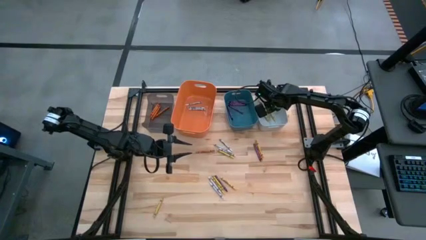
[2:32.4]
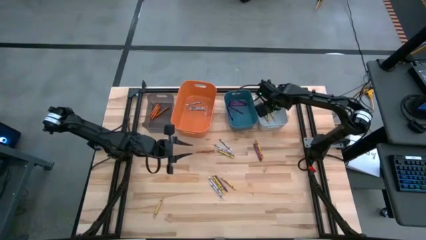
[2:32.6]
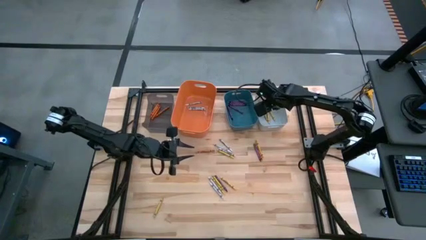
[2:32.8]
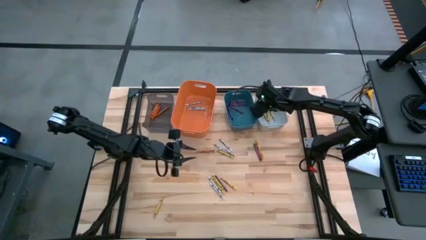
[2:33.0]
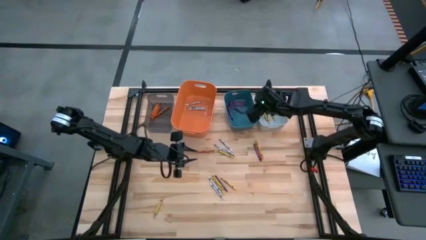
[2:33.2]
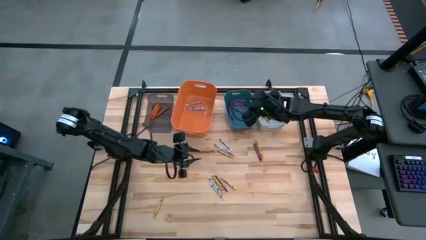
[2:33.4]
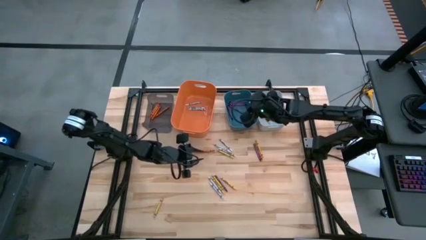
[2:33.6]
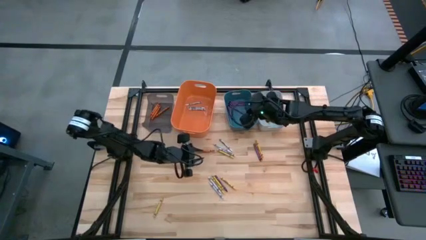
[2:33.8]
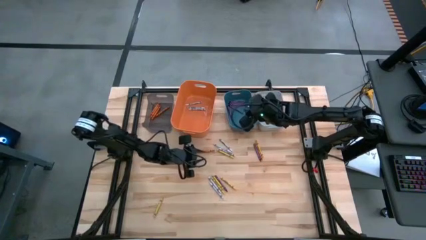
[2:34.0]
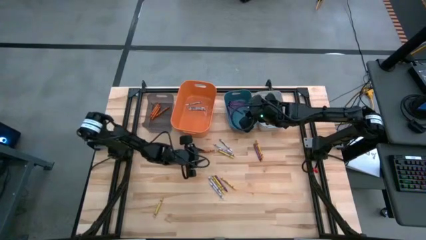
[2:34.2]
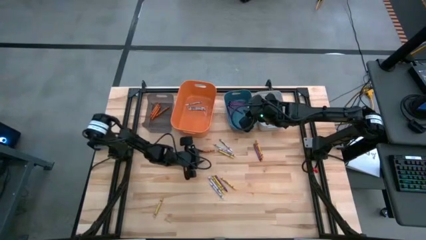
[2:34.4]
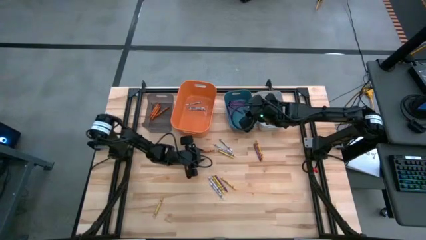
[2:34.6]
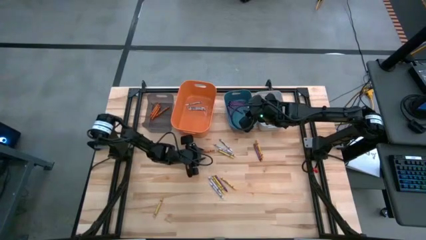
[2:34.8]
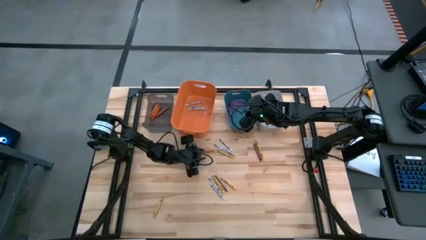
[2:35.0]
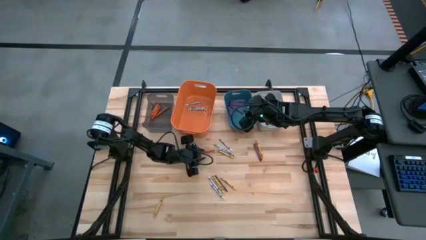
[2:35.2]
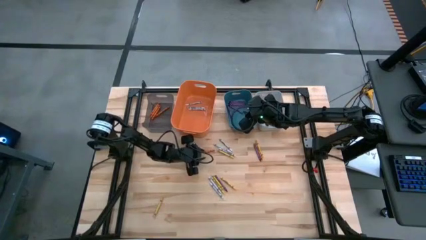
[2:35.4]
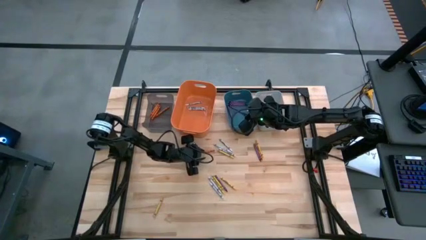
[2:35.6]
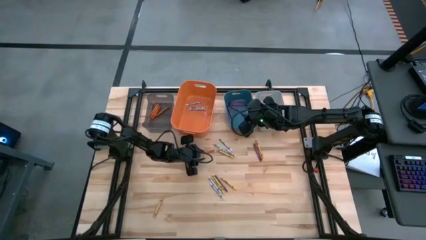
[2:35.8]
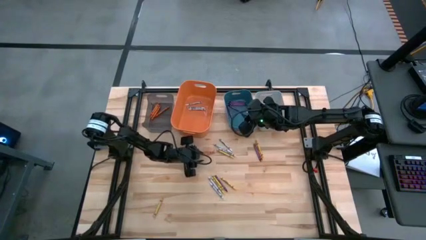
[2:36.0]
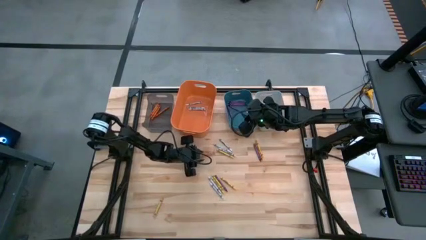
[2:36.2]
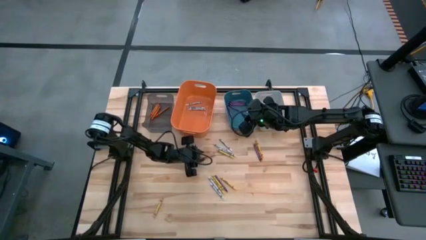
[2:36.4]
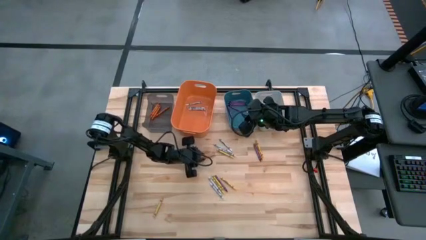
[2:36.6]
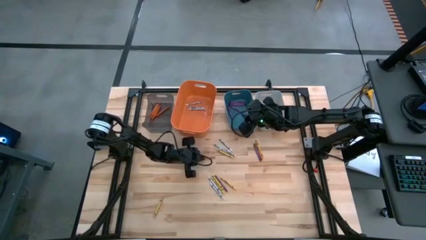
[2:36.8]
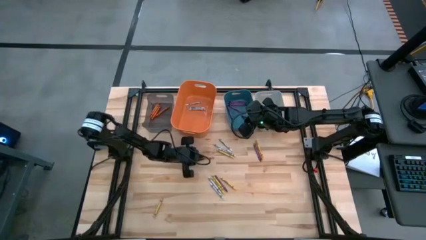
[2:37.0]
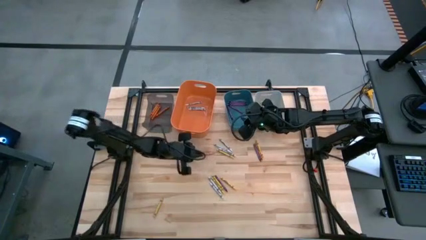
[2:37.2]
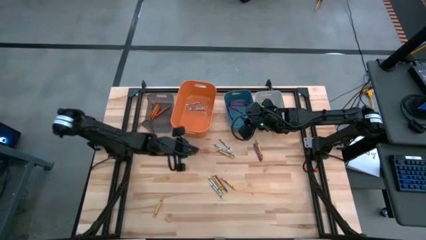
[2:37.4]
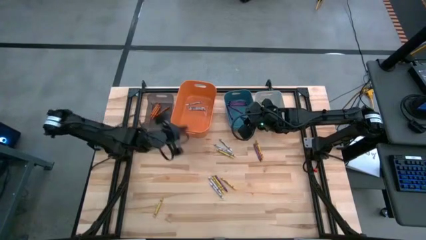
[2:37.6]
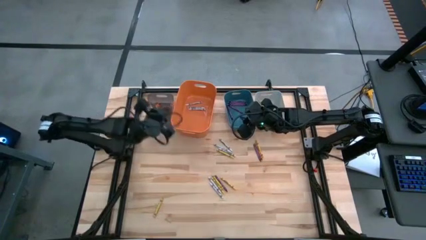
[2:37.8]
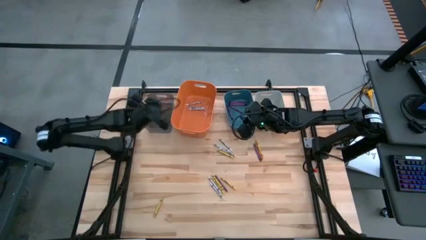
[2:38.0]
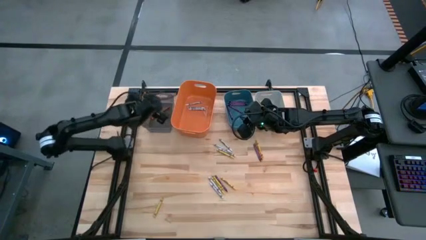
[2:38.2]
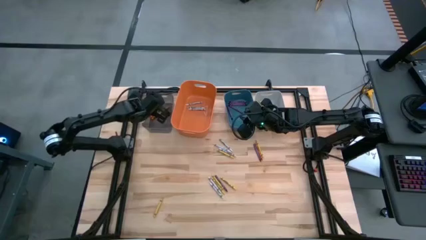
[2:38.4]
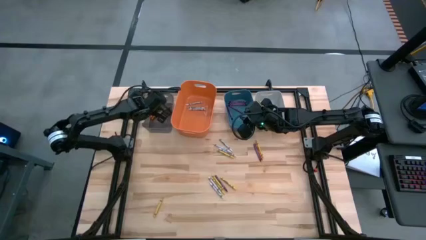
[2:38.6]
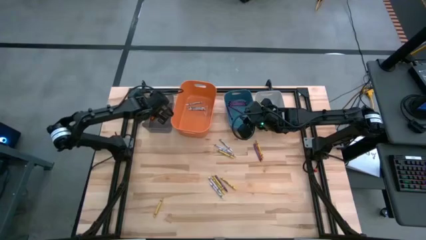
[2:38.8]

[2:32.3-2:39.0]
Task: Sort crayons
Put the orange crayon into the black bin

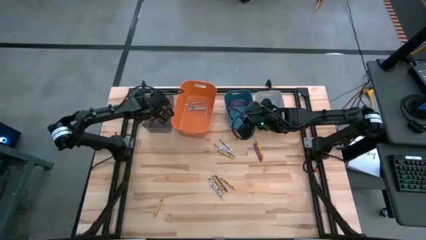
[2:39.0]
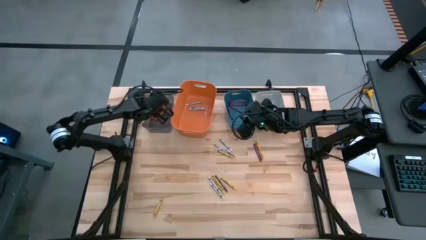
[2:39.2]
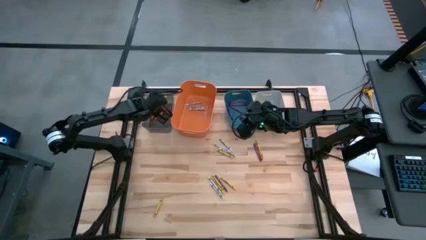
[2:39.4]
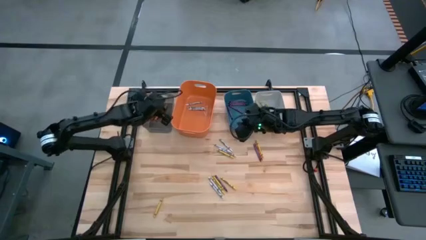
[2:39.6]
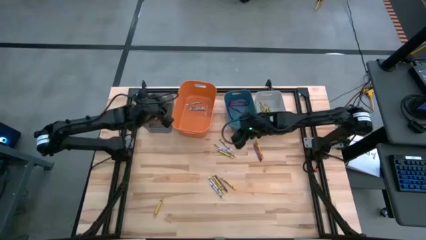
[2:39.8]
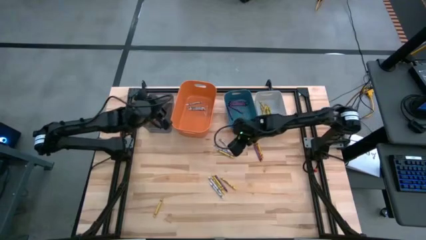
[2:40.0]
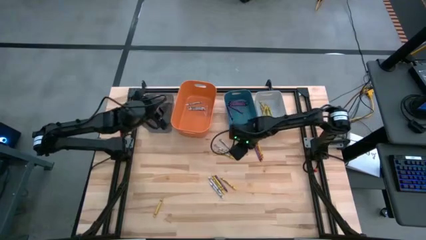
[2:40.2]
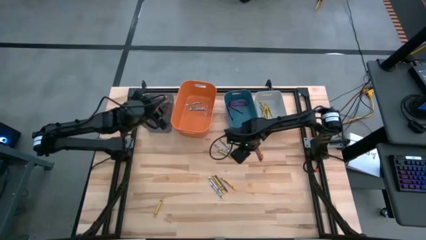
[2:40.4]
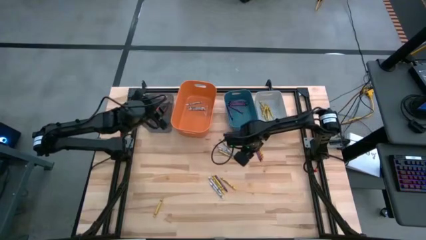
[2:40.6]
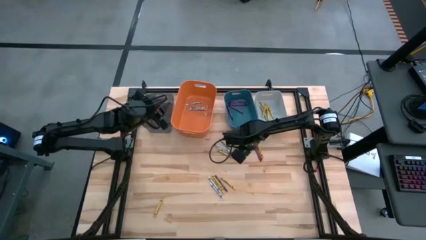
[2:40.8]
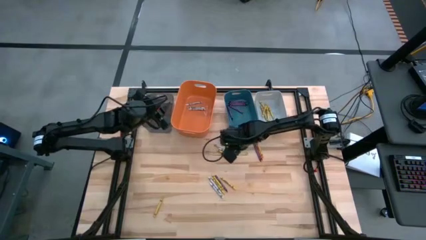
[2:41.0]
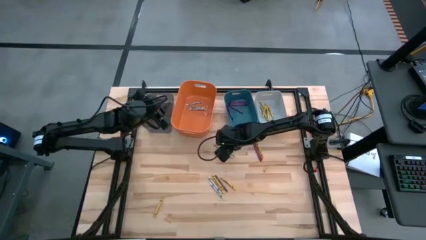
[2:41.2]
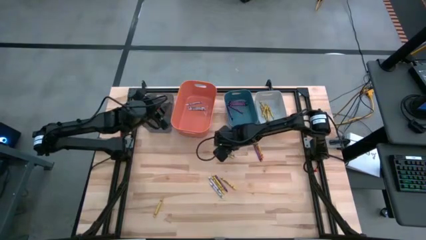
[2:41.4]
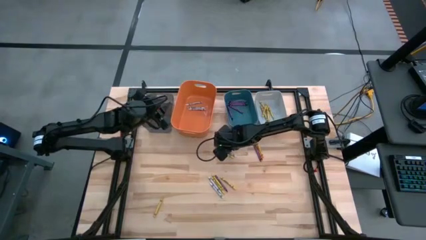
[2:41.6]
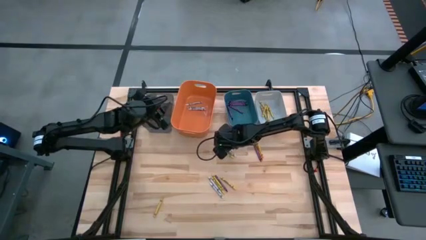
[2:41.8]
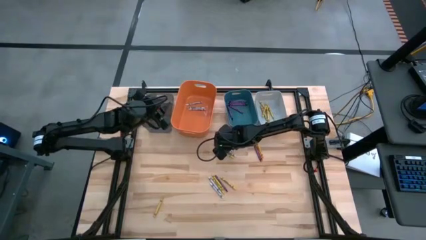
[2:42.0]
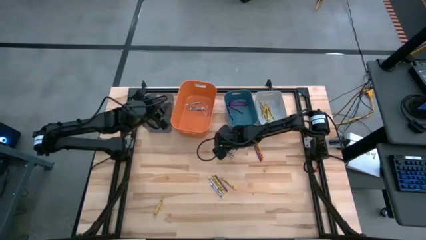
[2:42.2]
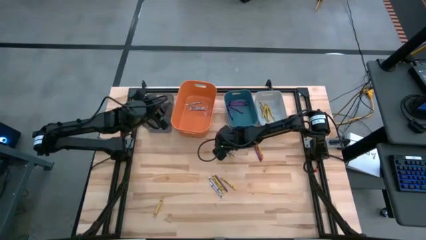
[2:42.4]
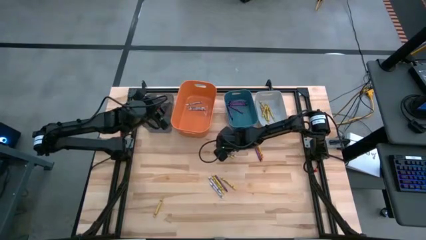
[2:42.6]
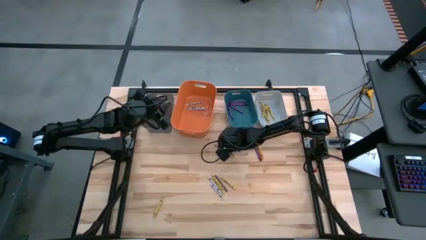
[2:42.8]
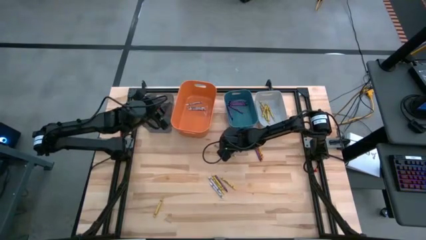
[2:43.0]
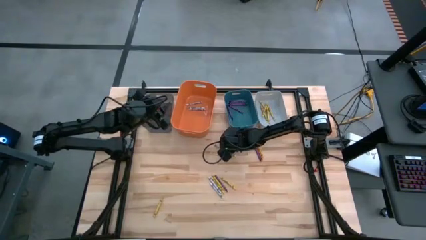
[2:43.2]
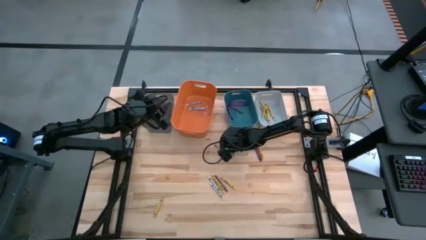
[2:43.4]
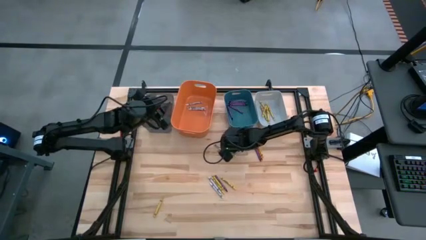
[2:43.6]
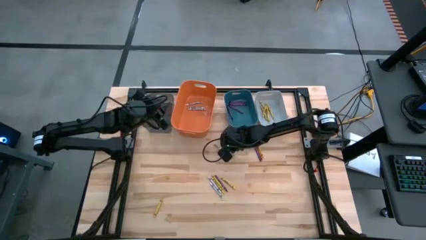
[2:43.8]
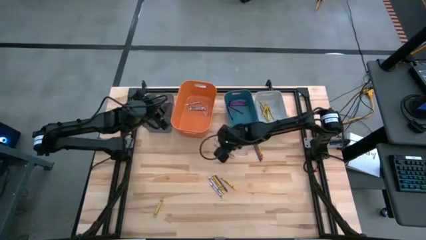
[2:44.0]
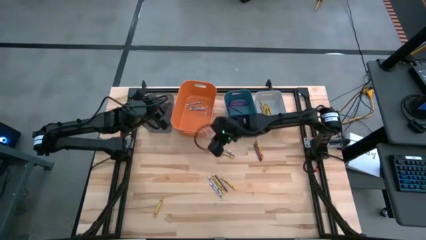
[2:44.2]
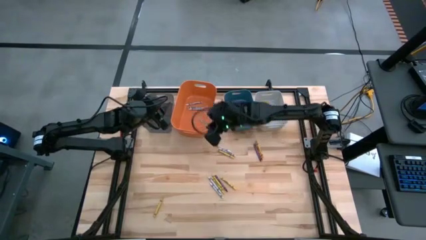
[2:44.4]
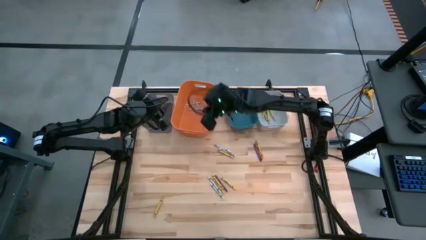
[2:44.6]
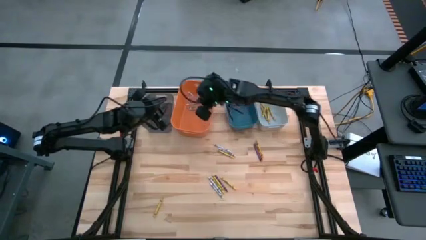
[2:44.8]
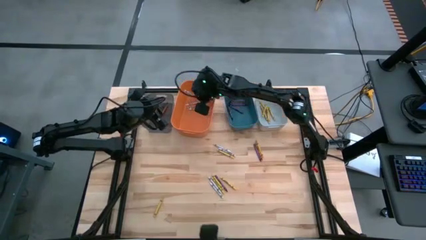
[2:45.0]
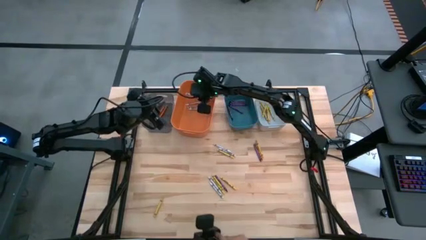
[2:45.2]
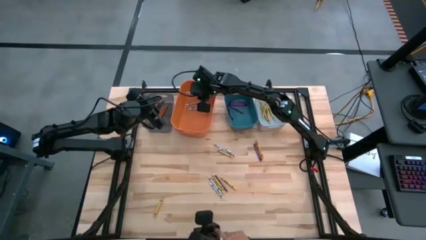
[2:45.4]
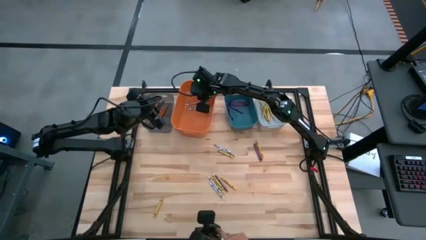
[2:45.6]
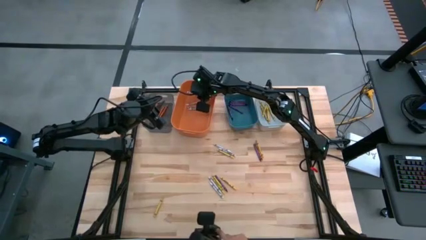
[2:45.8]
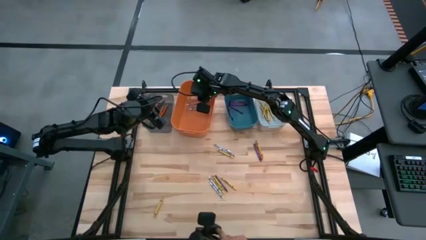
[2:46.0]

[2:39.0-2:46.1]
Put the white crayon into the orange bin
